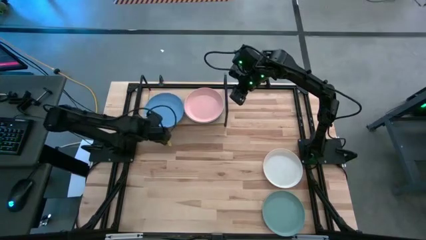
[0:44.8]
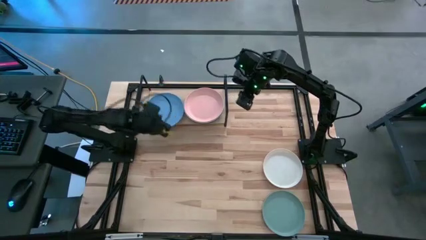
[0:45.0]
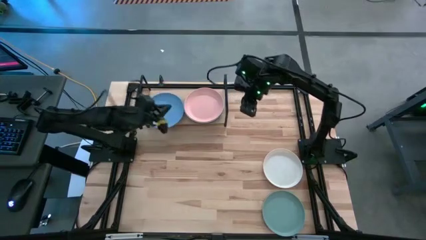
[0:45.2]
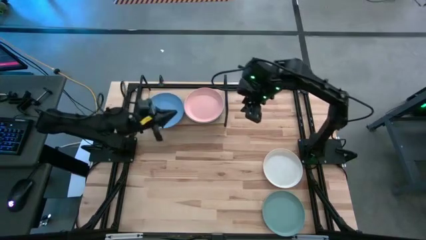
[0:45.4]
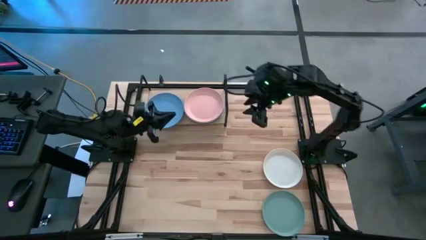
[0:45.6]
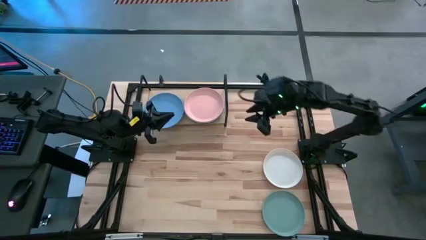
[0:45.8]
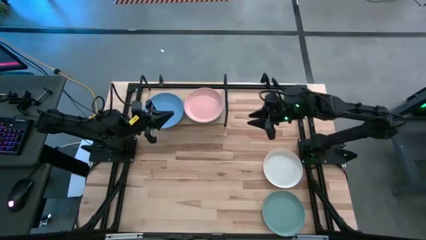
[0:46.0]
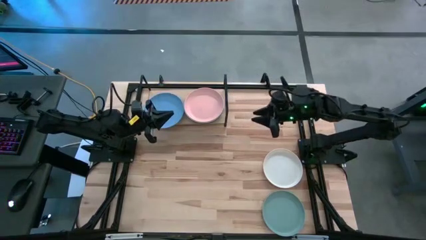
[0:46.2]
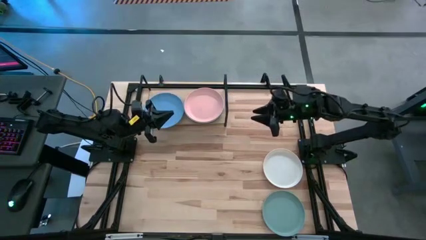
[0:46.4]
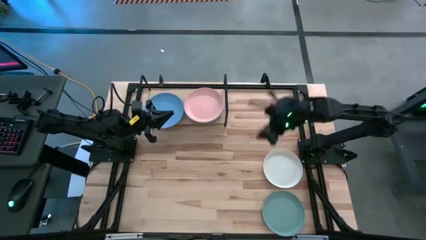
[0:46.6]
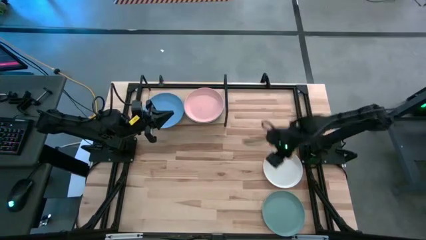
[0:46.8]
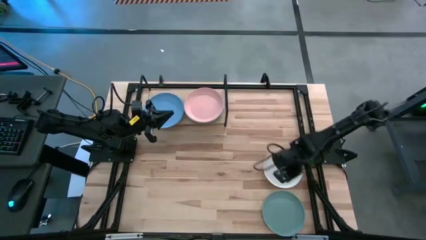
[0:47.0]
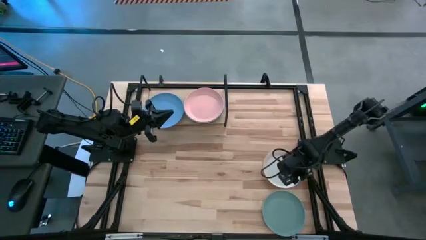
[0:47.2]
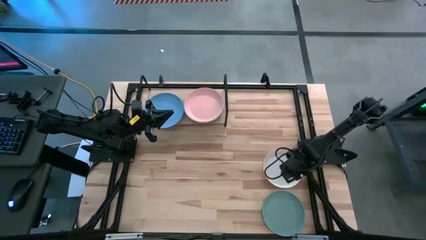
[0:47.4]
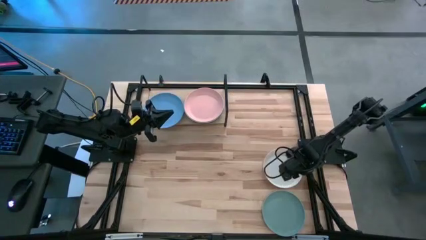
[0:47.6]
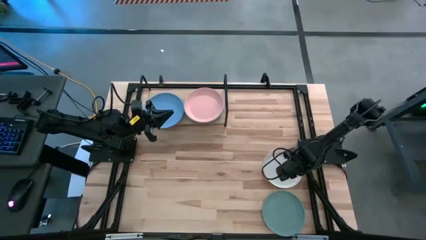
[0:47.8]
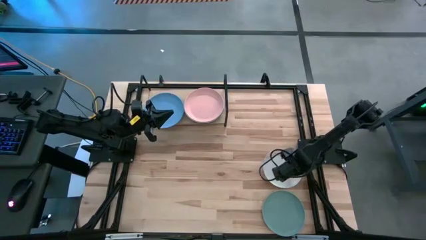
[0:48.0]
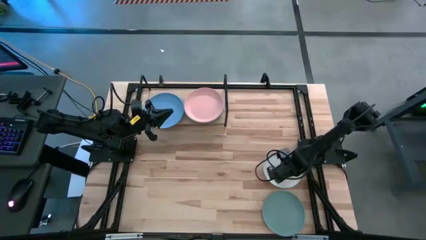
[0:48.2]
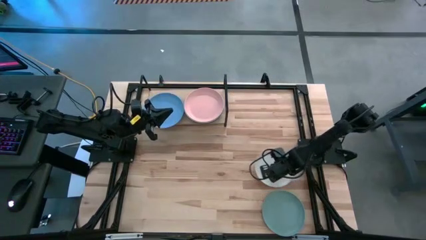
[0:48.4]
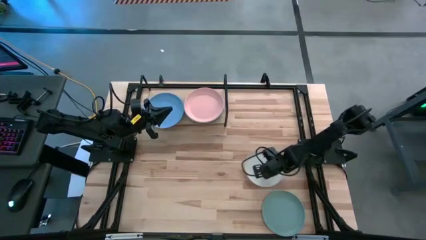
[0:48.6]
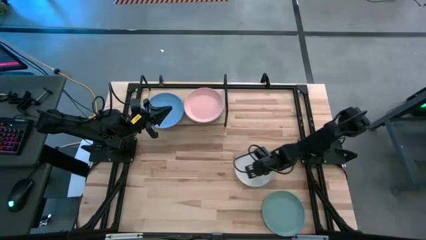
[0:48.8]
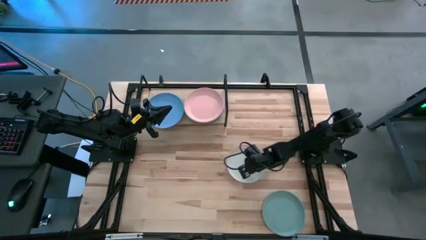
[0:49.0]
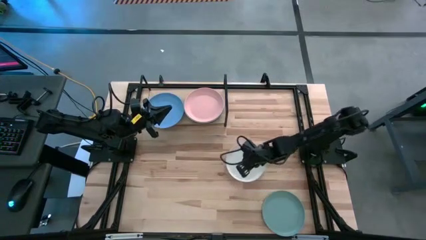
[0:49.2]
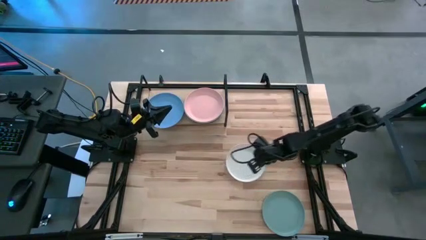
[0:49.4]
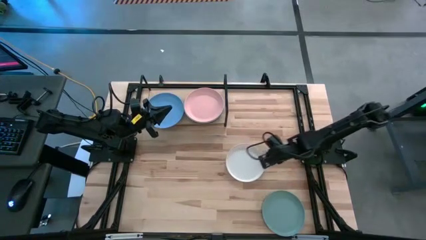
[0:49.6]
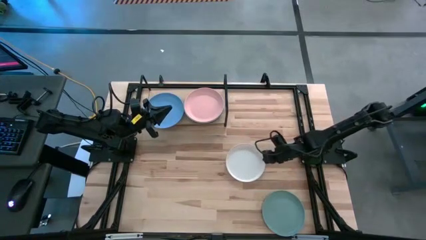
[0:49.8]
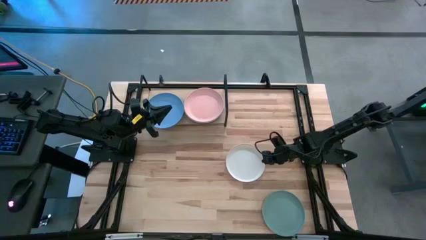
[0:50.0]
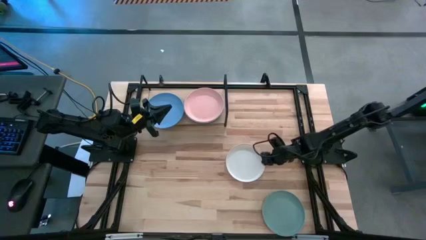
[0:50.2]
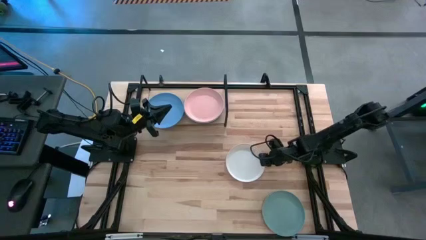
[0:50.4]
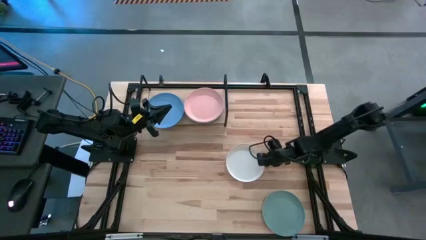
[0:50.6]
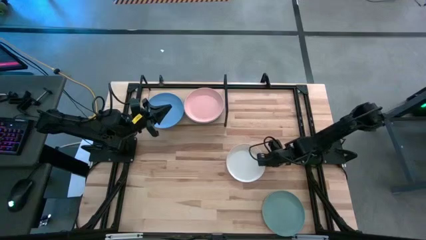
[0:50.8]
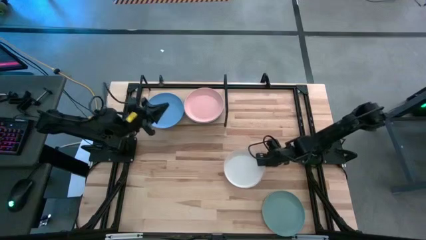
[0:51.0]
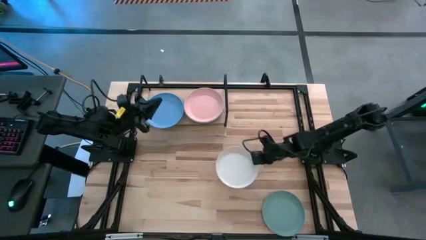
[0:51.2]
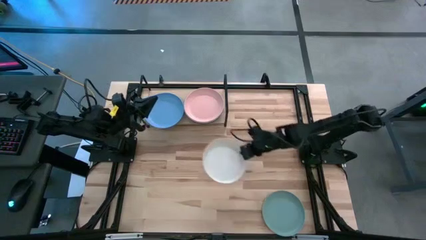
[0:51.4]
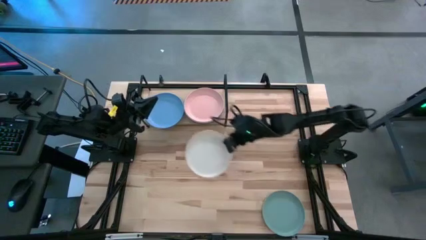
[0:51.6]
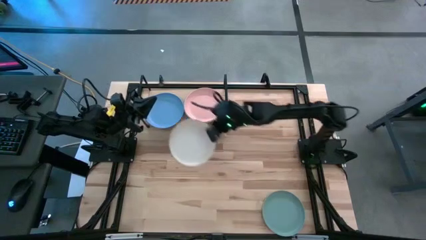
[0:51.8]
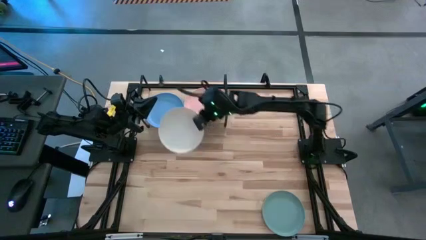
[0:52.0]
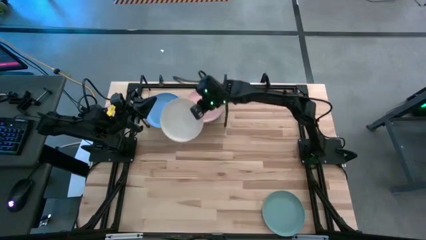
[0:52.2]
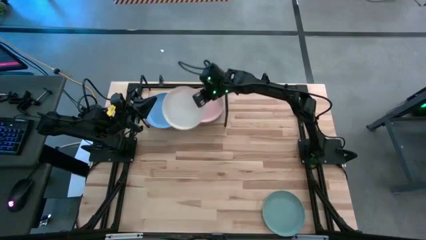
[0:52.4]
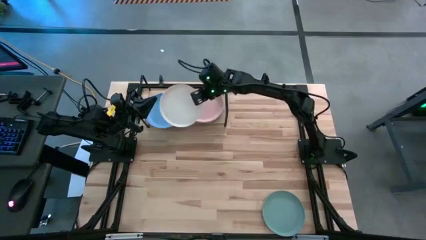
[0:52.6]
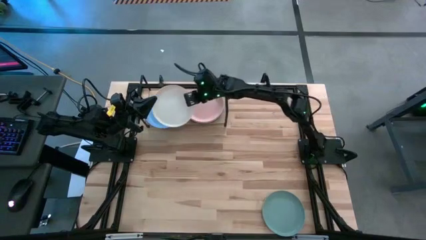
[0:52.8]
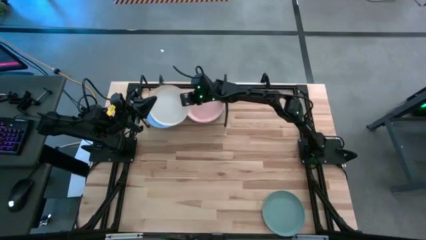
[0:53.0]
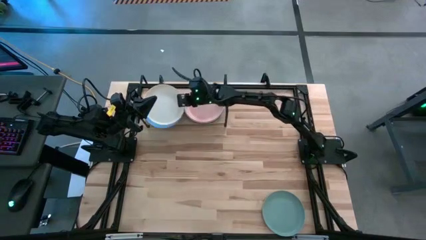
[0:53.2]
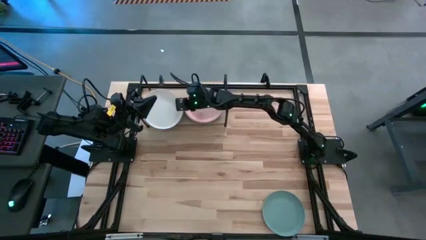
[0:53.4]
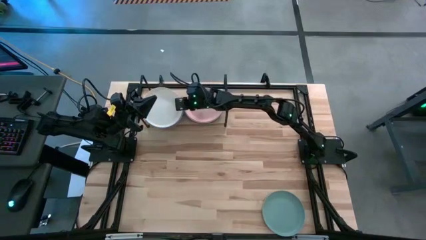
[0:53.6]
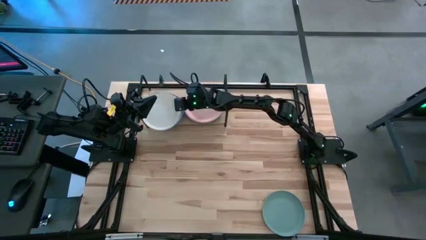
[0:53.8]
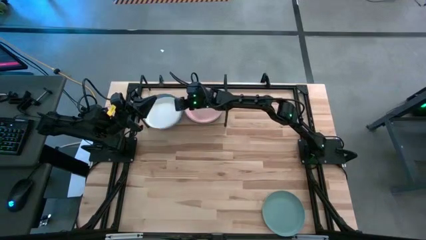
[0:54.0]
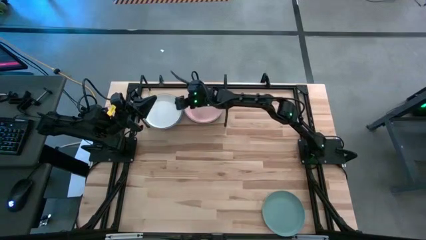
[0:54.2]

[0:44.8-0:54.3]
Task: Place and stack plates onto a shelf
Stack the white plate on top of the blue plate

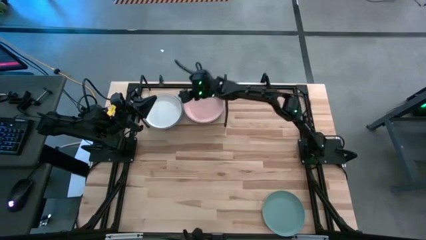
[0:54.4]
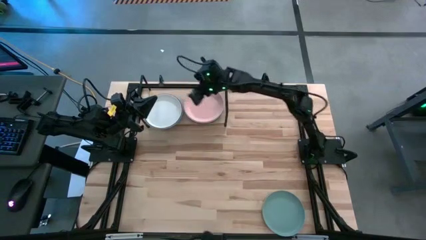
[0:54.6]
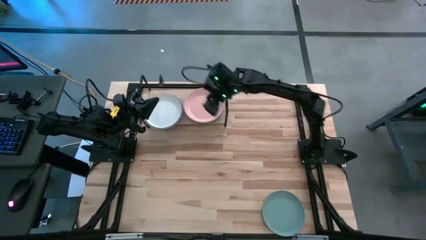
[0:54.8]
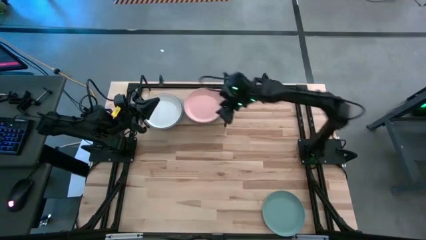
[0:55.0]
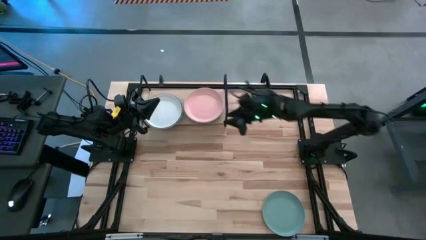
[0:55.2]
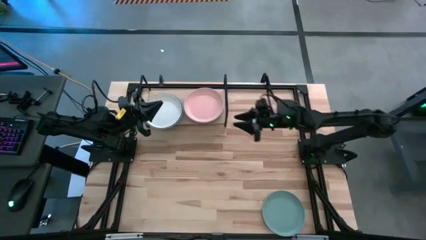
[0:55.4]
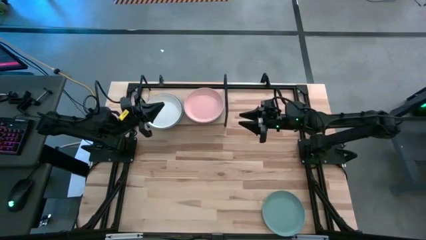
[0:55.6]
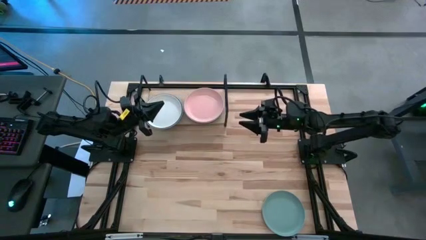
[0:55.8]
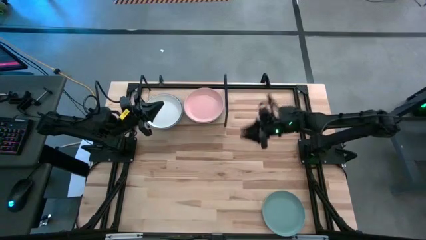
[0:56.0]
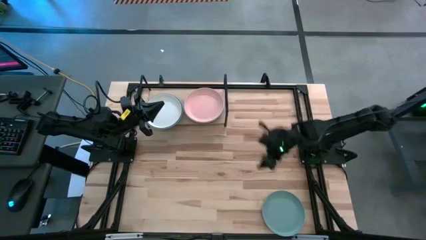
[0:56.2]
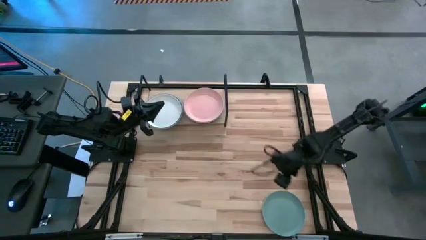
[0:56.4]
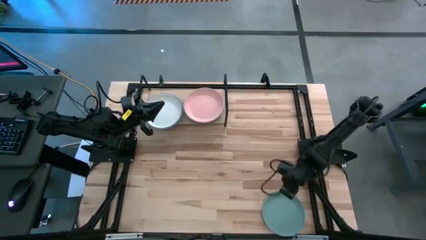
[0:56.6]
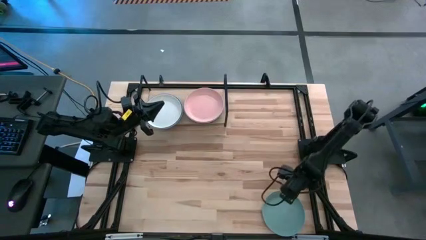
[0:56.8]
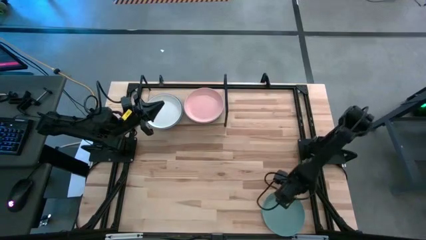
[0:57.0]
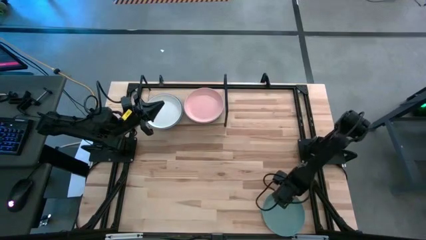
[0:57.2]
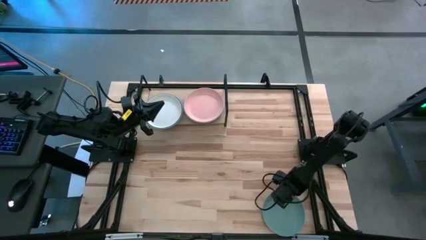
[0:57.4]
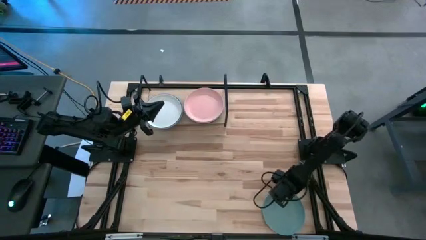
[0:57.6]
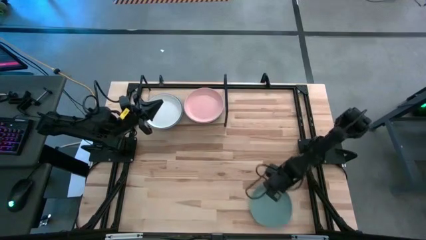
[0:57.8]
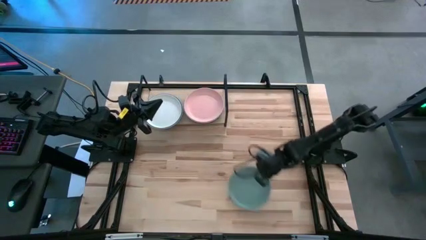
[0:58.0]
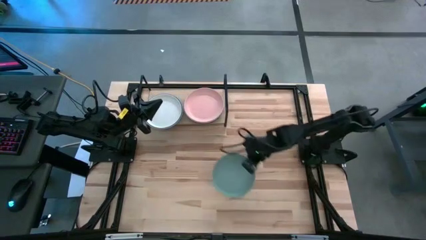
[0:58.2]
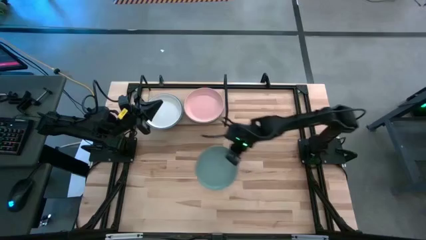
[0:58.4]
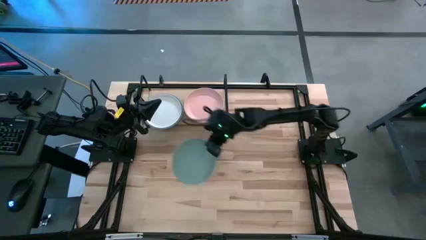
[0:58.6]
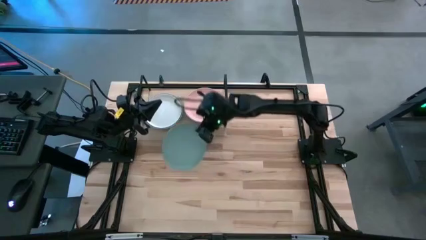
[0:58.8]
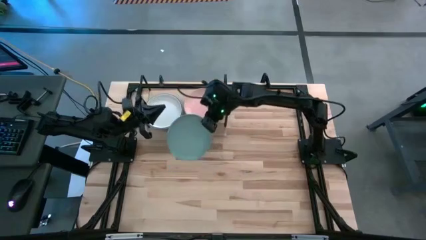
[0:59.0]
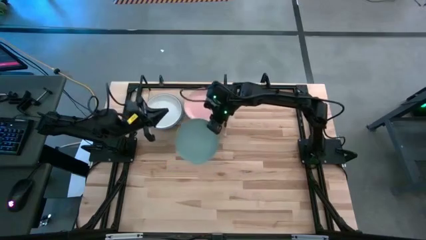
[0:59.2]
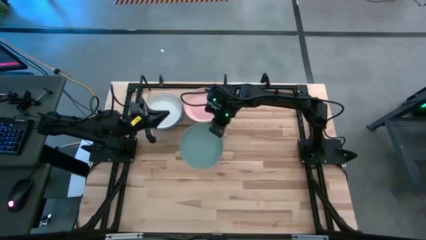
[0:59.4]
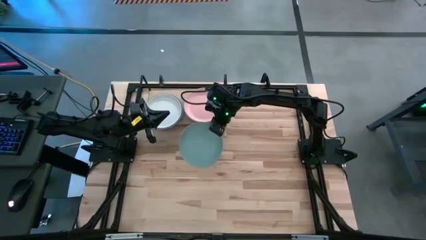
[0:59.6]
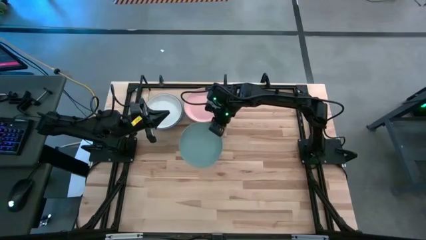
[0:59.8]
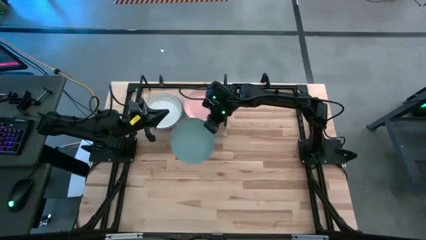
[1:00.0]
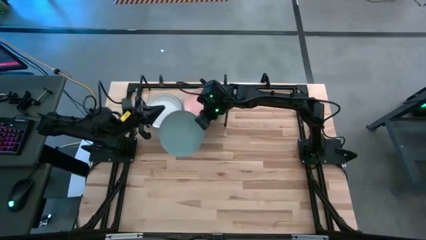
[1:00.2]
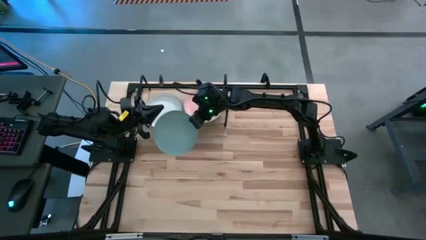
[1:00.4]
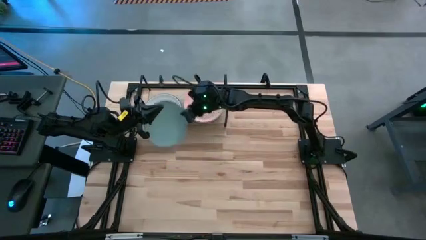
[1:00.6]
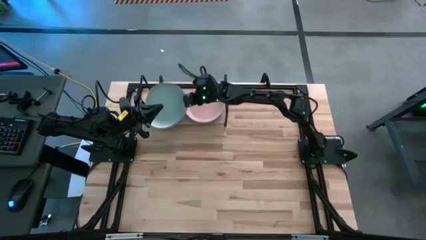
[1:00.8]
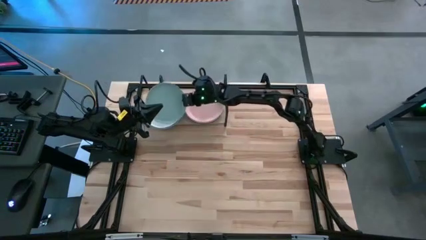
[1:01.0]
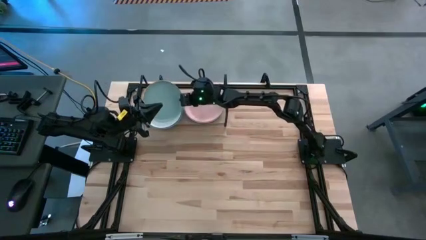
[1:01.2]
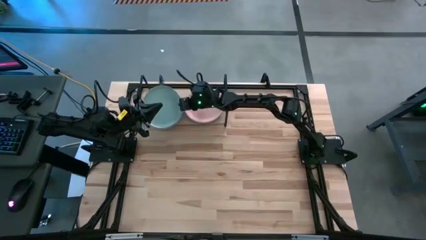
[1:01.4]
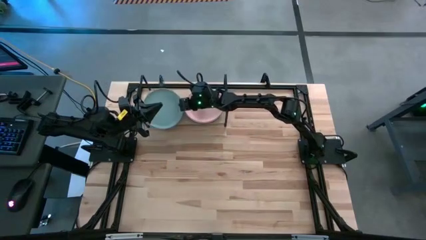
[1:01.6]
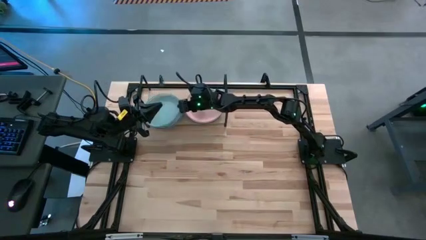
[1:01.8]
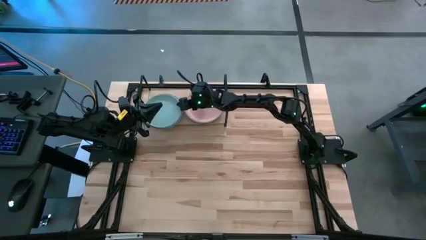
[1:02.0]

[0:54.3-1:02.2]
Stack the light green plate on top of the white plate
